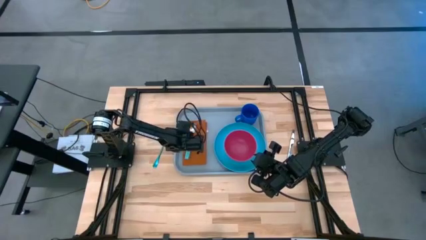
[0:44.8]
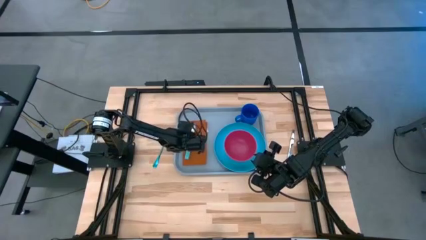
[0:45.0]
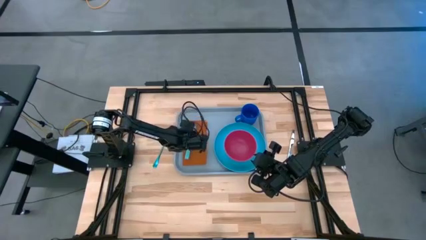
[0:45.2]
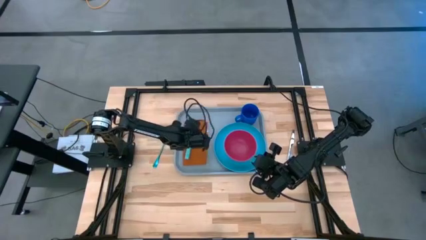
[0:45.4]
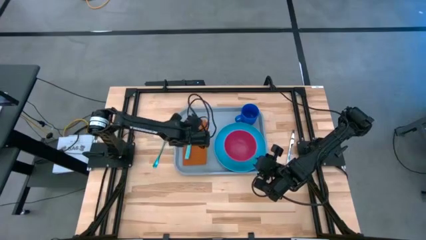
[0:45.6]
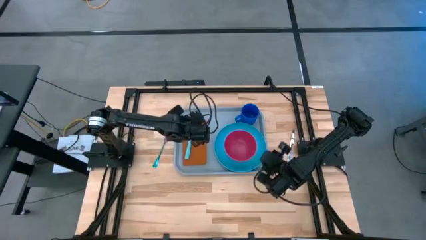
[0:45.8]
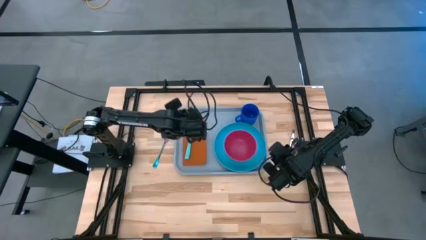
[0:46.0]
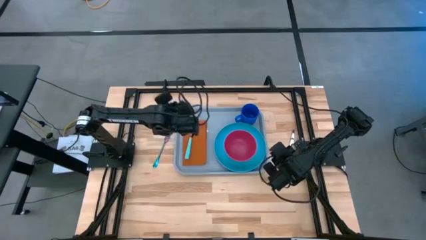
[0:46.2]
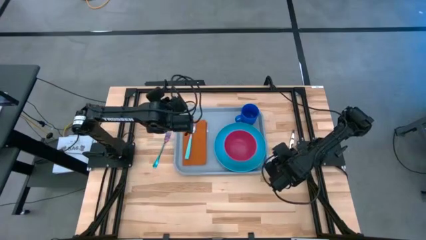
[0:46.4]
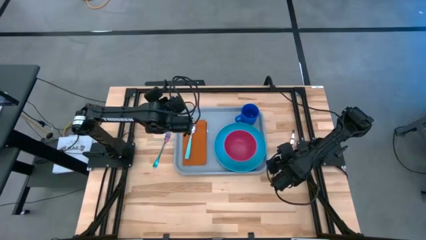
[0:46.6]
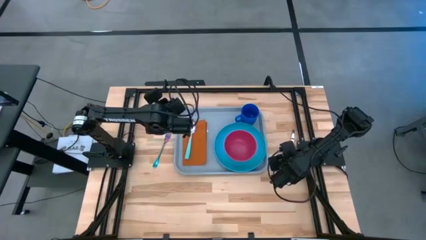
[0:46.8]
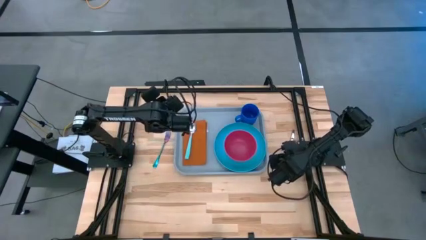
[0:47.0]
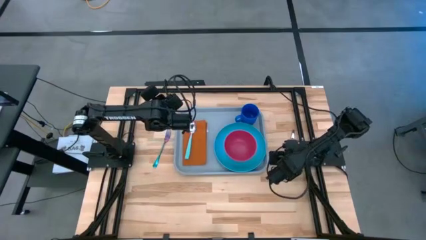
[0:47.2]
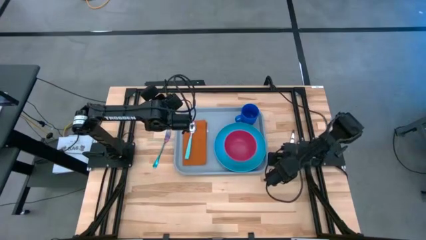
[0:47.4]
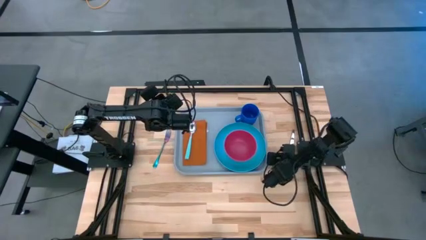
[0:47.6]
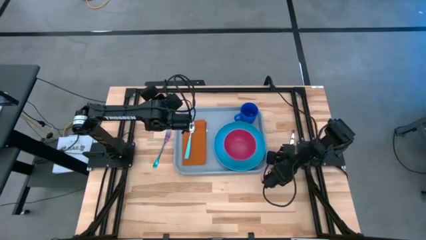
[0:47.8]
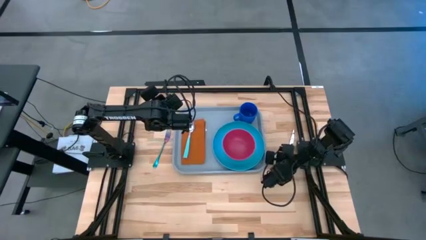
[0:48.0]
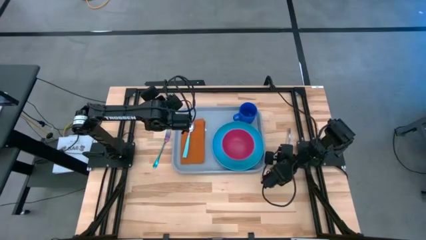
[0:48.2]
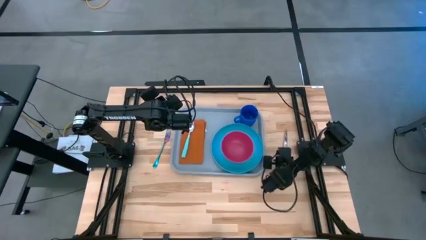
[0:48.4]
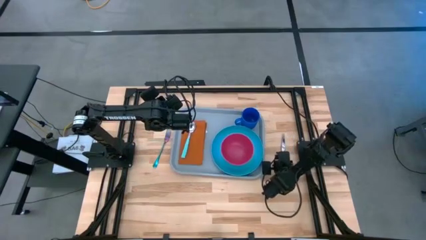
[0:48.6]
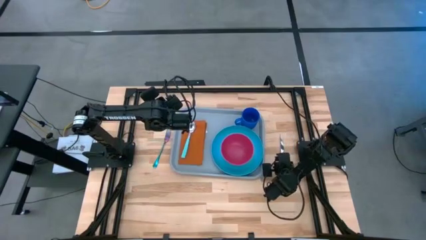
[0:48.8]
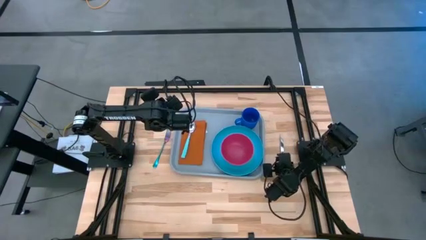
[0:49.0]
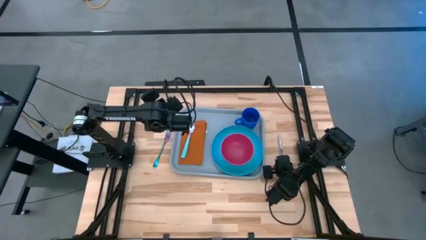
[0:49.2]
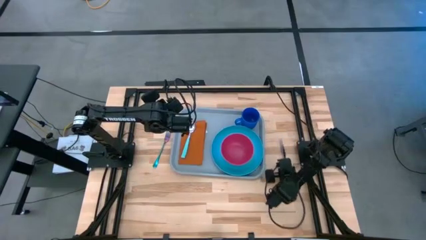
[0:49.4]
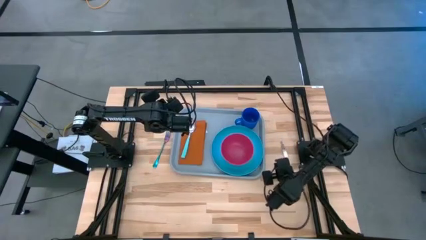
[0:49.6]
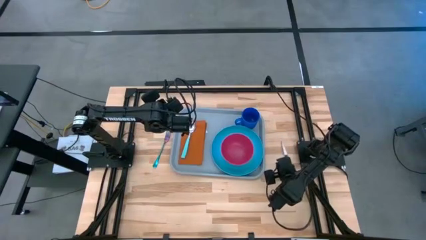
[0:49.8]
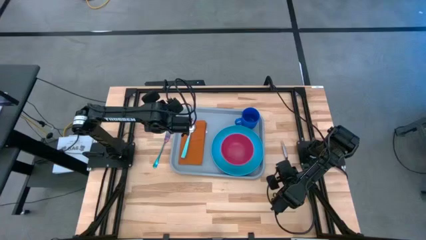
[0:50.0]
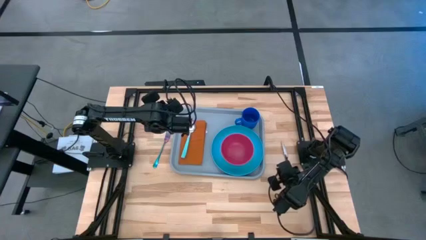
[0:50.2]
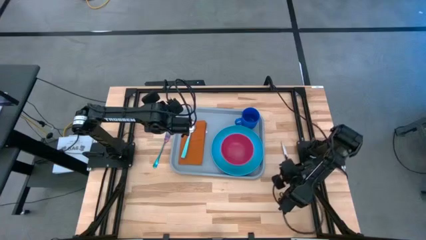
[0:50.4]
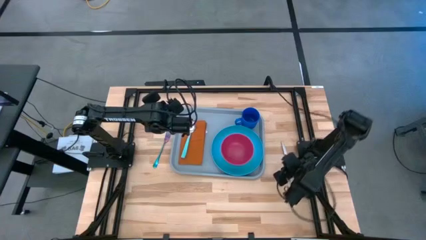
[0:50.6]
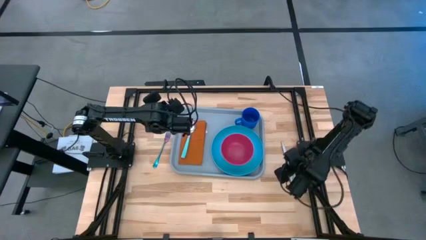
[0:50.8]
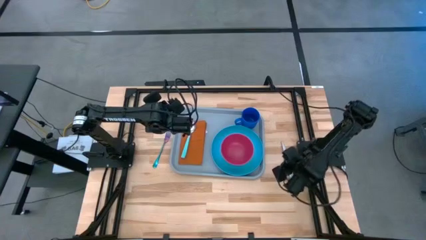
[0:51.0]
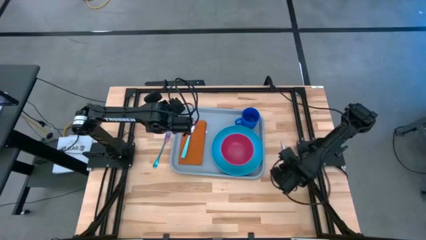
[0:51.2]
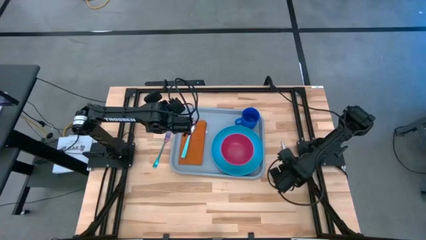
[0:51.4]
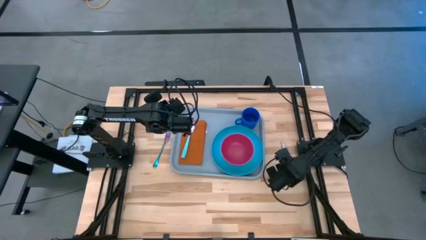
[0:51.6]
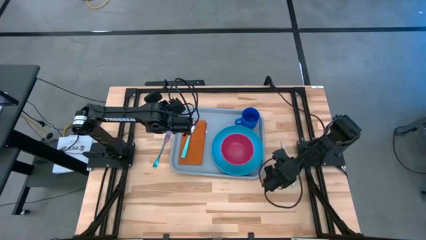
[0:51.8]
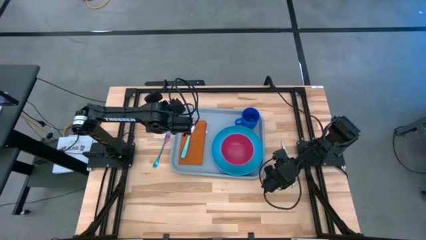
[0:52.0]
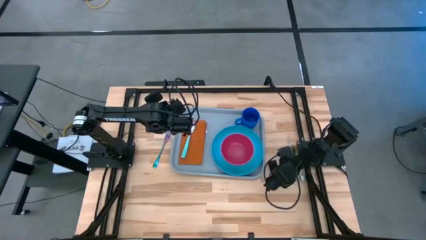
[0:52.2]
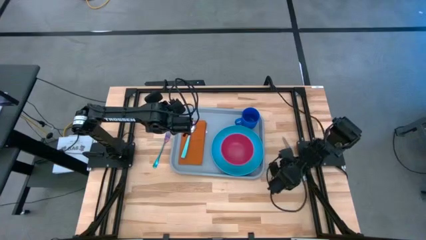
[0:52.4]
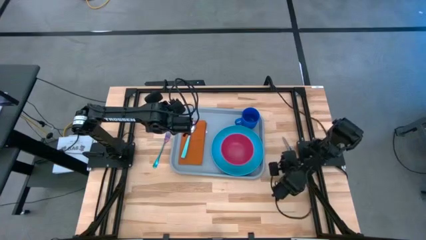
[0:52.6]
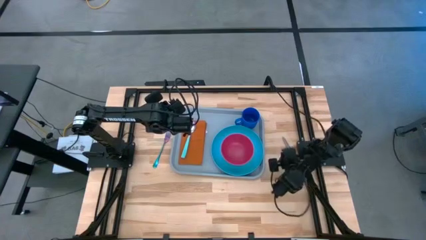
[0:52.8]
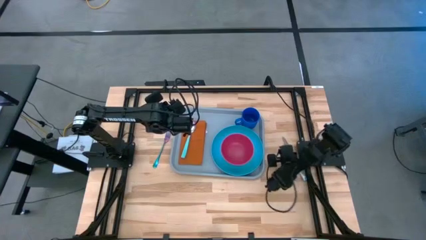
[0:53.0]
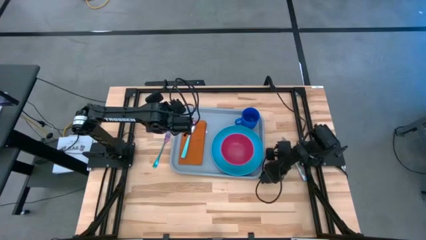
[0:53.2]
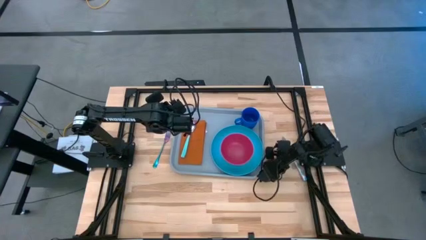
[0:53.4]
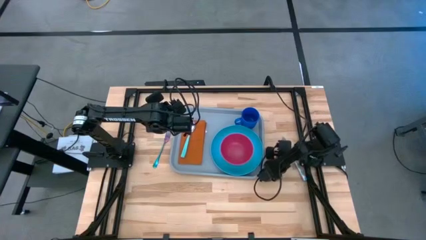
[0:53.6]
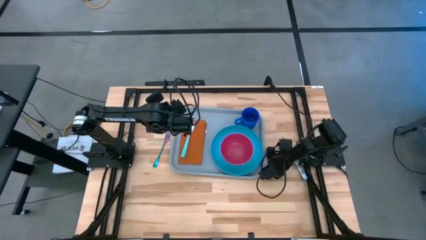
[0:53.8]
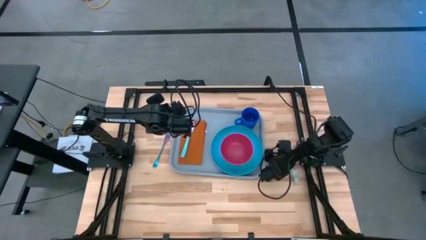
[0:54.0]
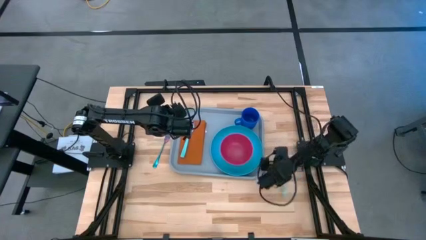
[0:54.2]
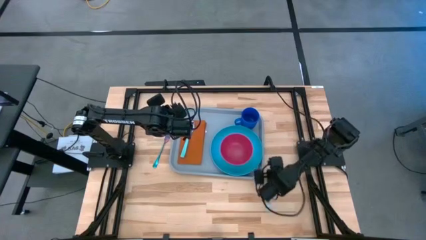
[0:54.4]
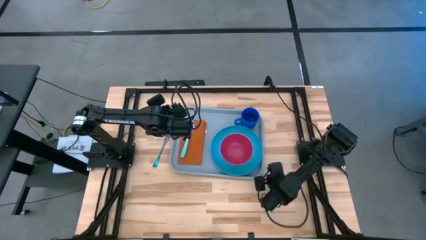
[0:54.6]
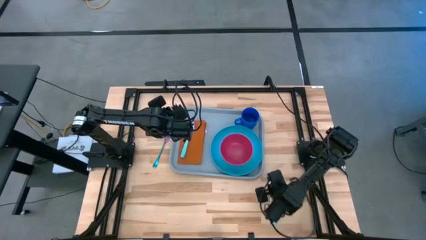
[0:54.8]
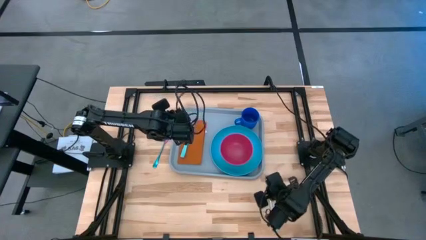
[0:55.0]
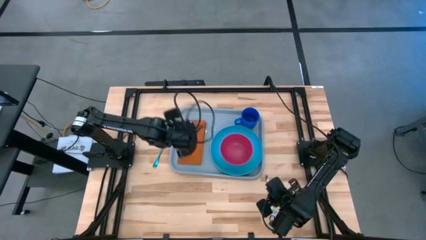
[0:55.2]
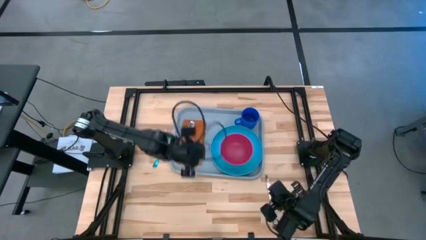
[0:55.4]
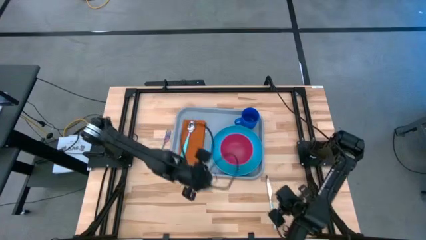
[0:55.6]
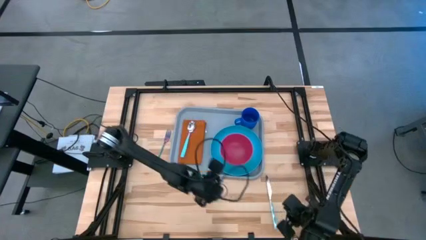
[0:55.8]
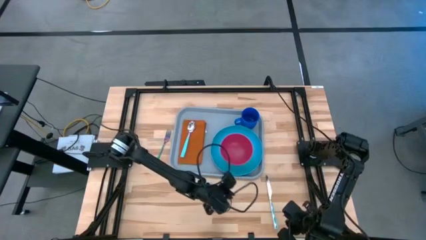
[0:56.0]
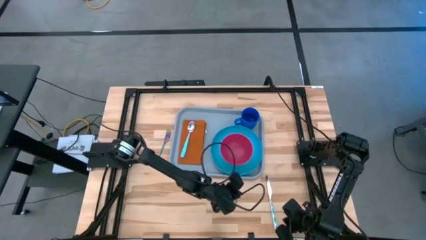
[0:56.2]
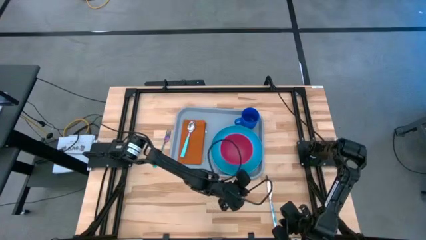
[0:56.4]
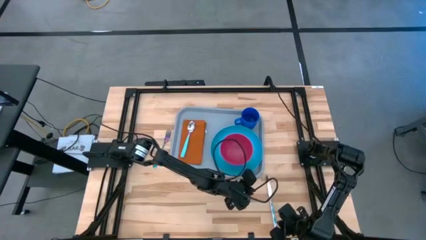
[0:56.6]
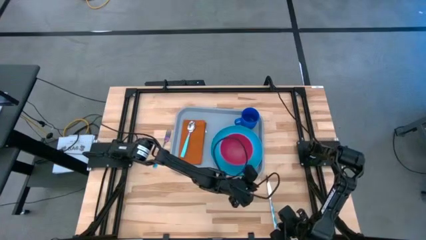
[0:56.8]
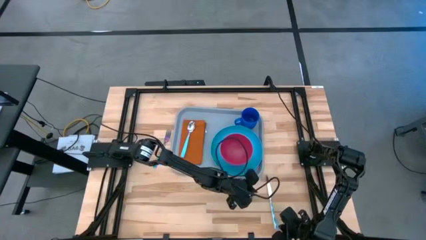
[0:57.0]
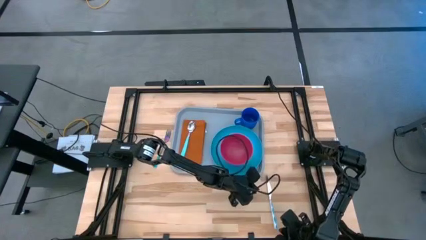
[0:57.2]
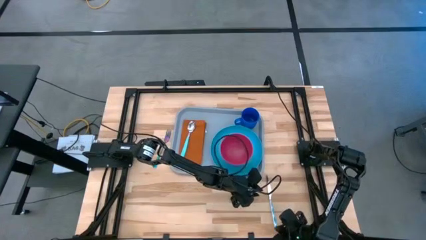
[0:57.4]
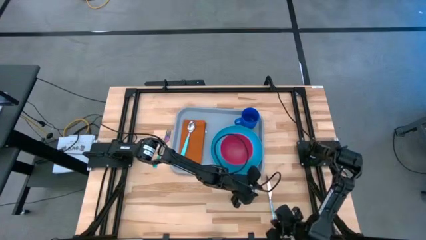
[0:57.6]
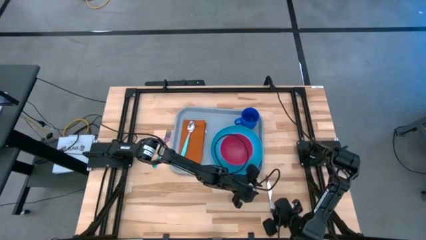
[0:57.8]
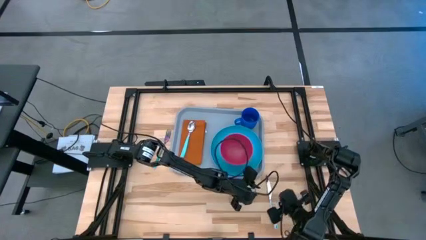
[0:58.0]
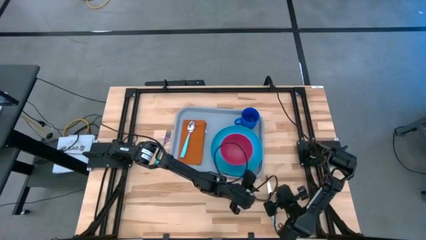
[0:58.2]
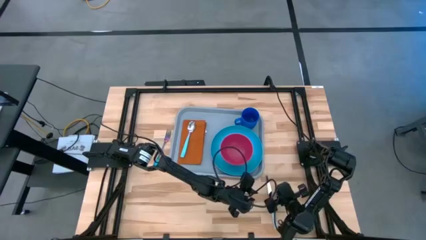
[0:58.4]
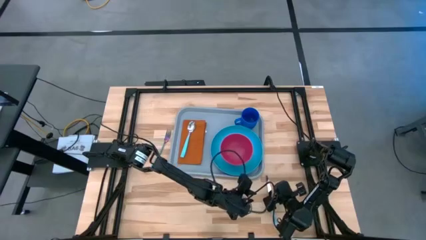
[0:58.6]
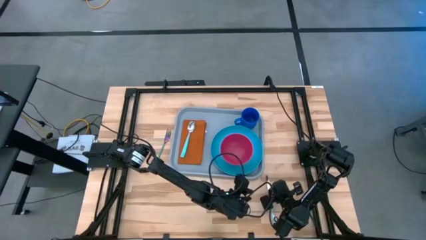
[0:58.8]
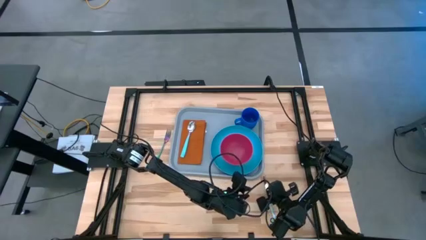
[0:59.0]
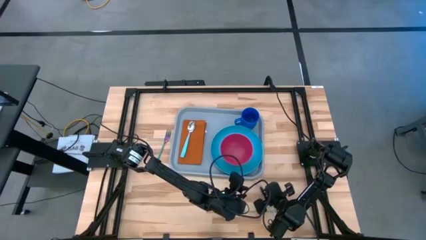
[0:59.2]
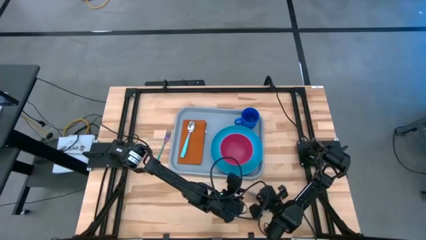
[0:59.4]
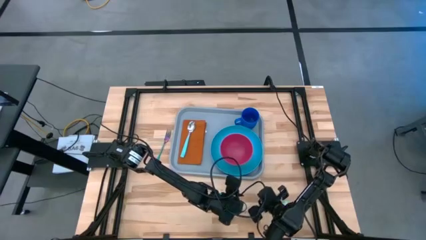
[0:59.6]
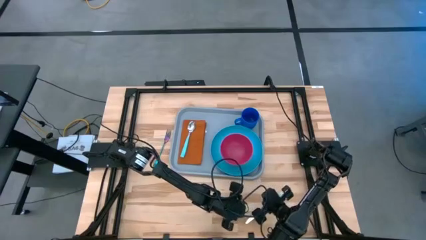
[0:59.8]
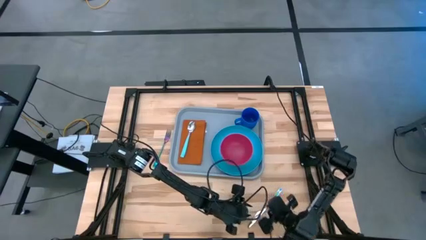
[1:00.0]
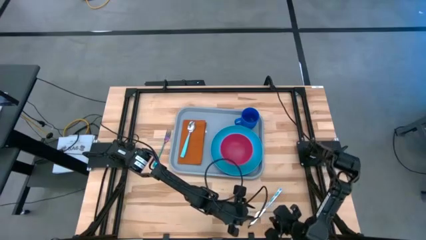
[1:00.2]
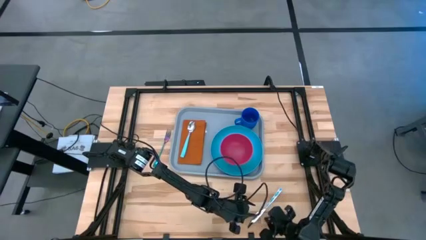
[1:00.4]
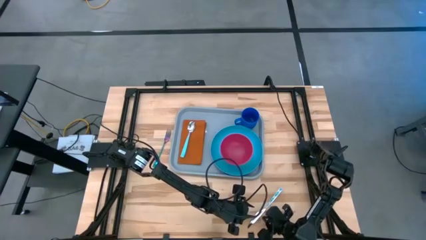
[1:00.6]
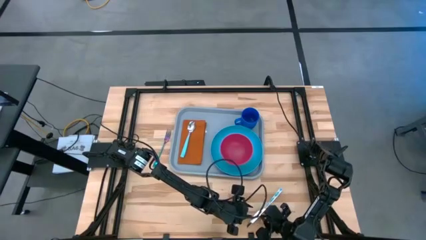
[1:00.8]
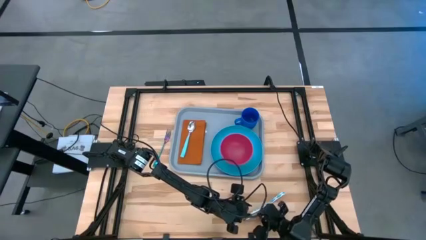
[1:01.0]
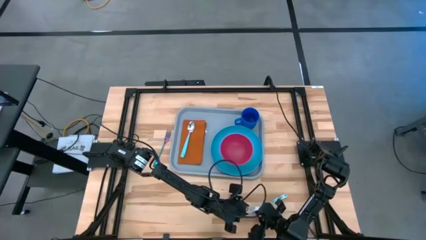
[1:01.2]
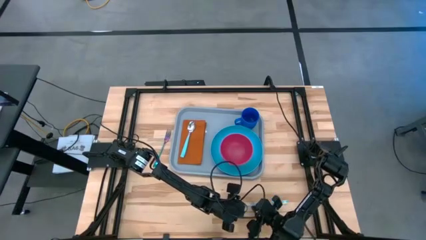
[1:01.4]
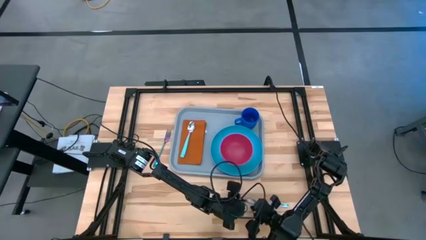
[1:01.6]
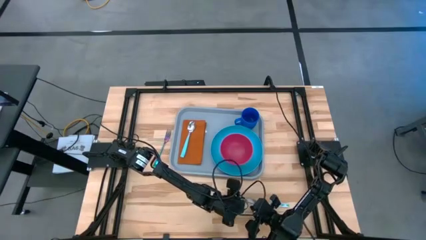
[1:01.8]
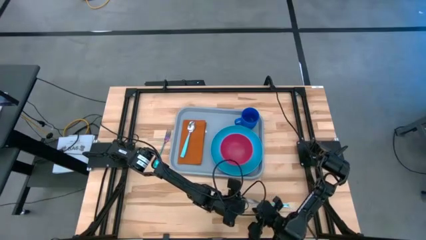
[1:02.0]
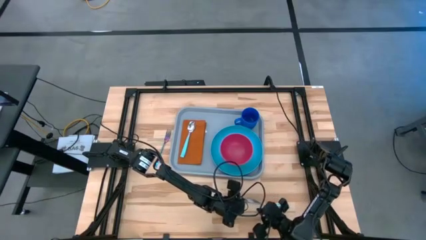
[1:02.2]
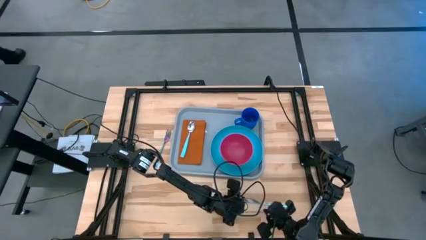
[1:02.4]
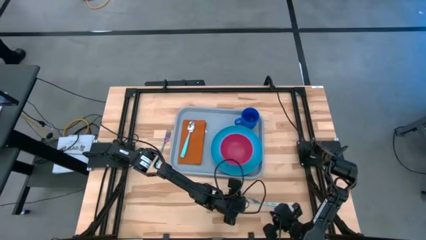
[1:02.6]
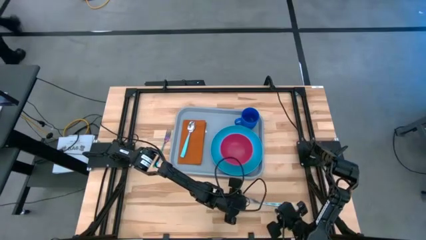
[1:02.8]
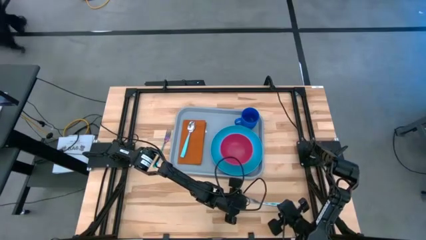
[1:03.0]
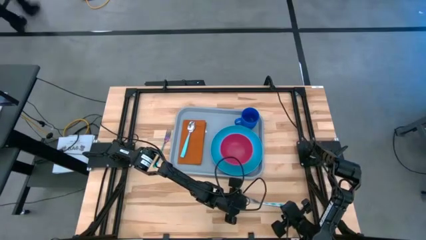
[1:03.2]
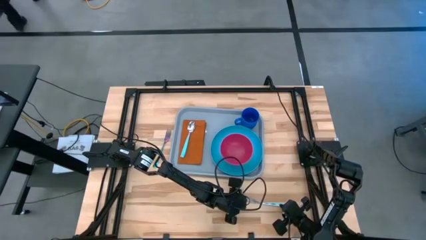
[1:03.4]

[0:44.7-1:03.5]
Task: Set up tray
Put the white patterned knife on the brown table napkin to the left of the blue plate
